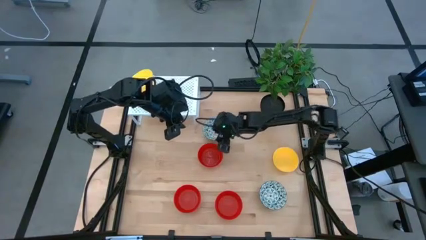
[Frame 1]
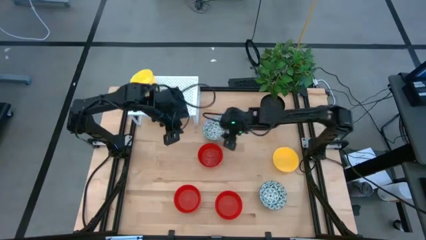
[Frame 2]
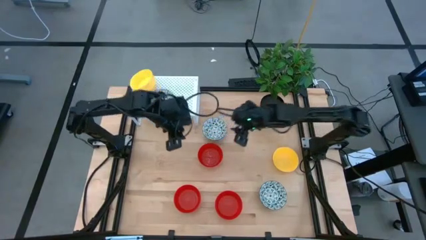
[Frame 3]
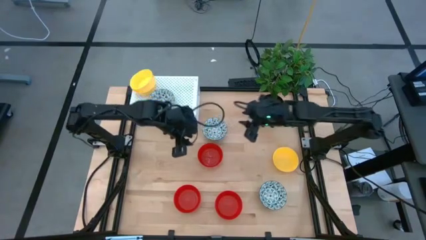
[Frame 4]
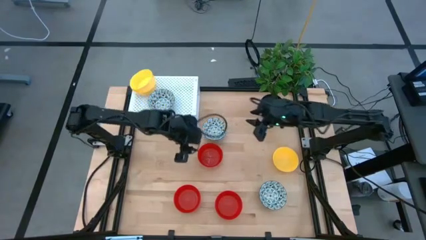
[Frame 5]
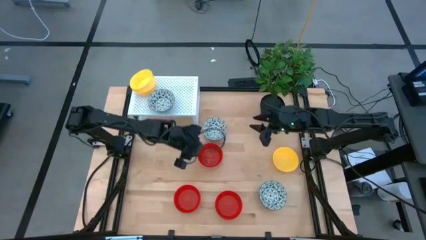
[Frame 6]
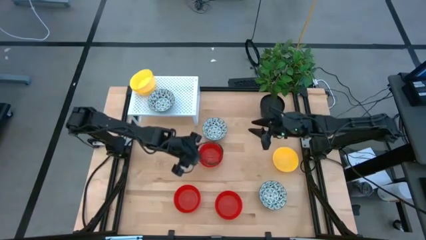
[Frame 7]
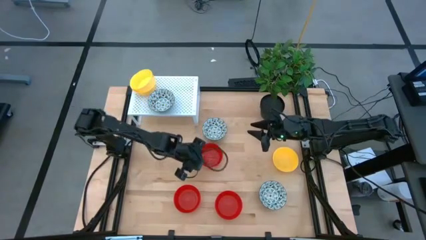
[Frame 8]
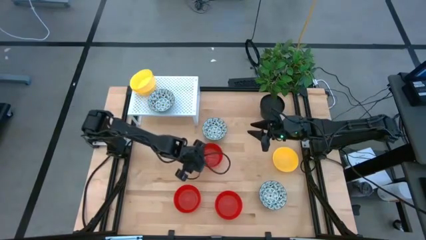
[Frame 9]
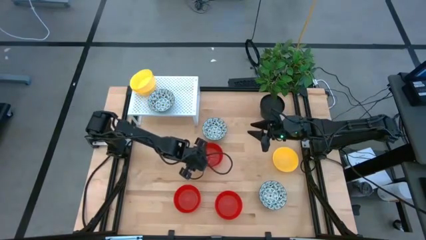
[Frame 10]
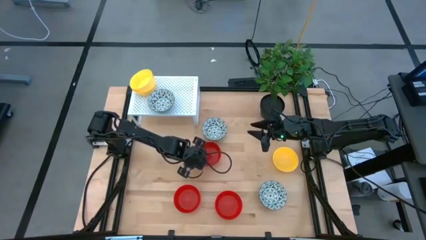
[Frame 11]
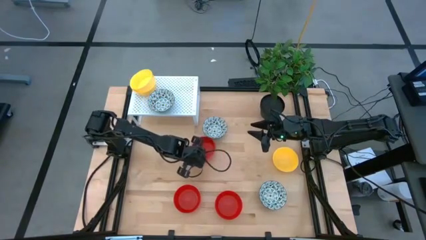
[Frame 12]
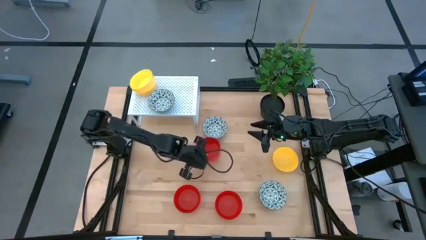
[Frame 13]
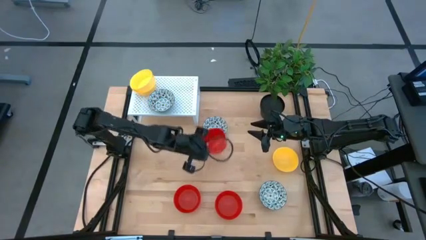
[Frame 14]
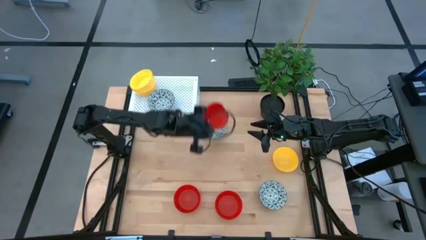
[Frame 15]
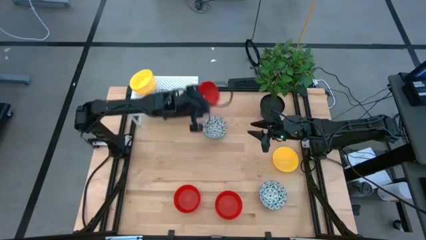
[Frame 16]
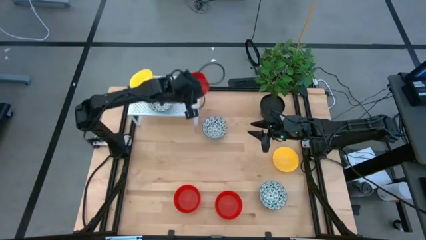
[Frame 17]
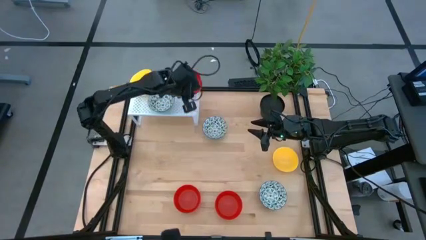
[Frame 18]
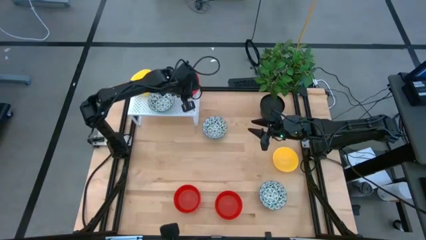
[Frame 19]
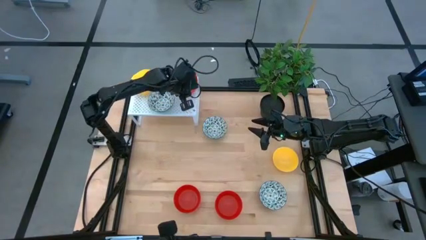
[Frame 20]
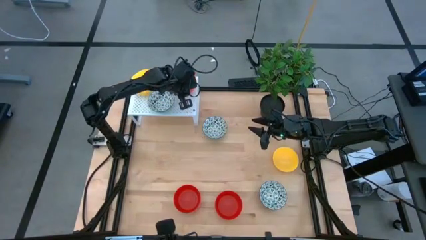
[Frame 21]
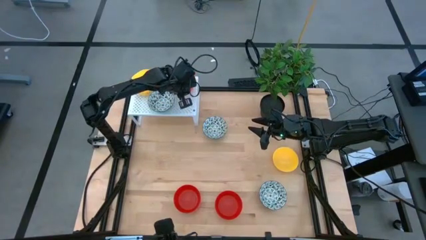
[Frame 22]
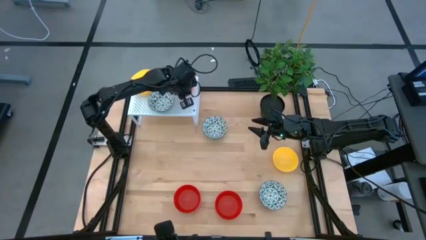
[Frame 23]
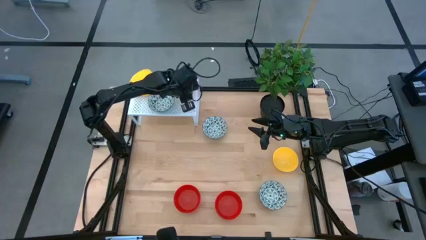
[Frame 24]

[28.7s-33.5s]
Task: Pick & Place Mini bowls
Put the red bowl on the shelf

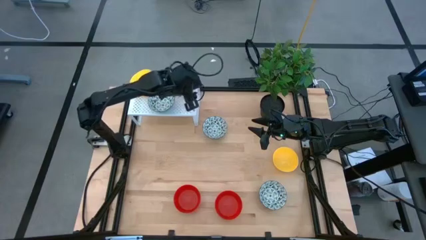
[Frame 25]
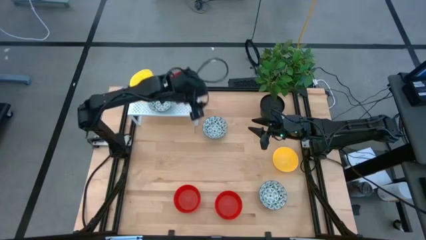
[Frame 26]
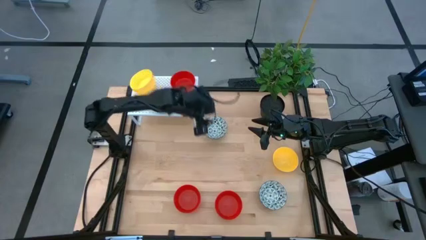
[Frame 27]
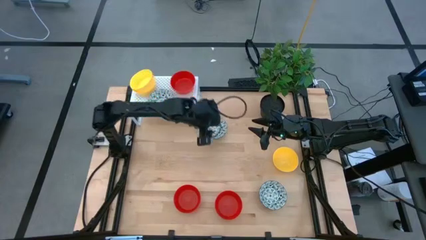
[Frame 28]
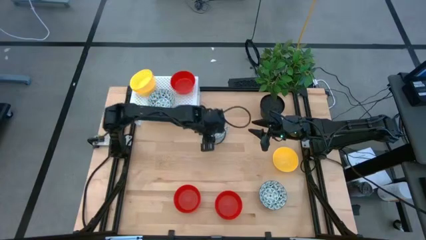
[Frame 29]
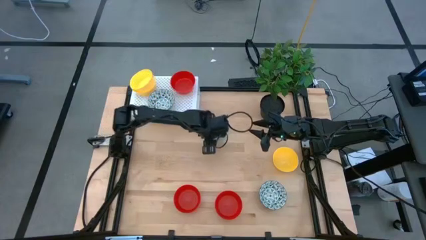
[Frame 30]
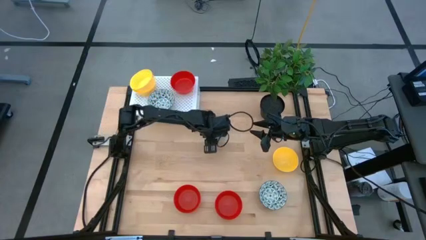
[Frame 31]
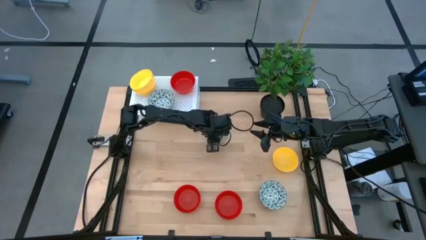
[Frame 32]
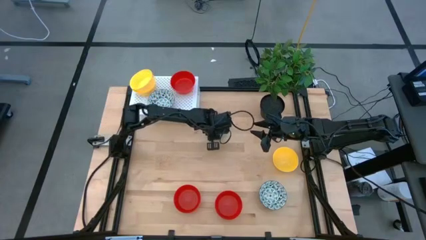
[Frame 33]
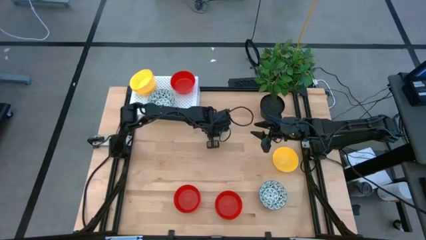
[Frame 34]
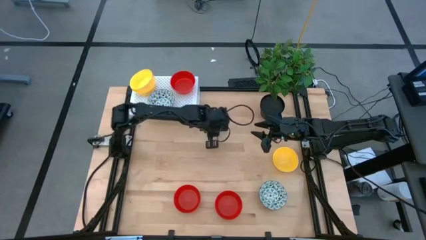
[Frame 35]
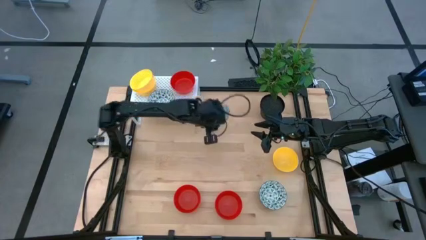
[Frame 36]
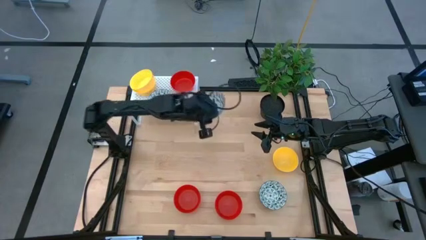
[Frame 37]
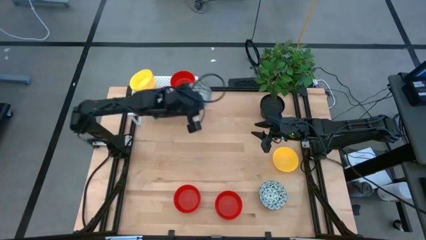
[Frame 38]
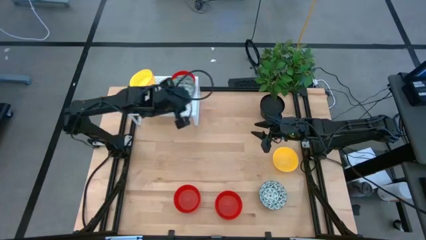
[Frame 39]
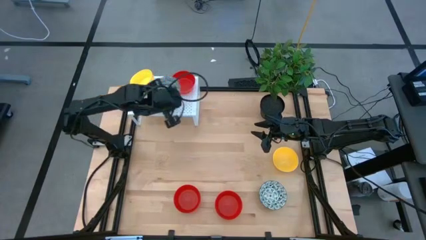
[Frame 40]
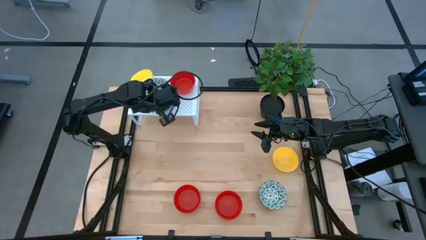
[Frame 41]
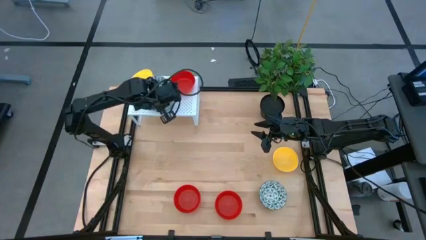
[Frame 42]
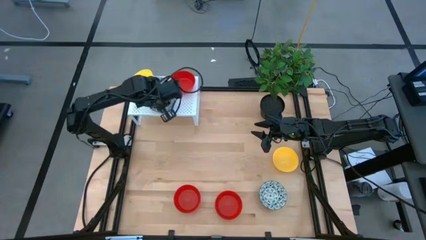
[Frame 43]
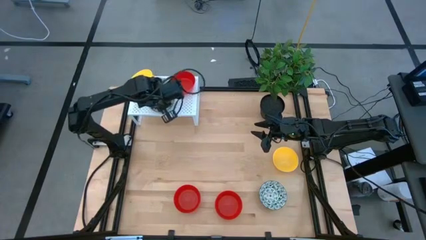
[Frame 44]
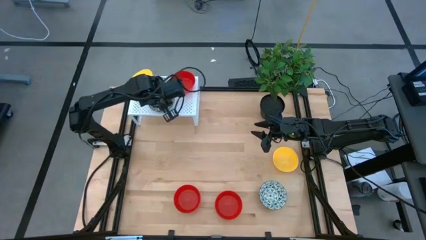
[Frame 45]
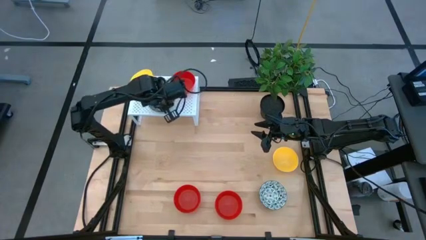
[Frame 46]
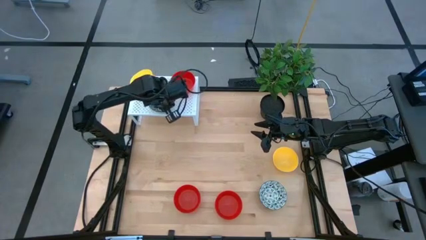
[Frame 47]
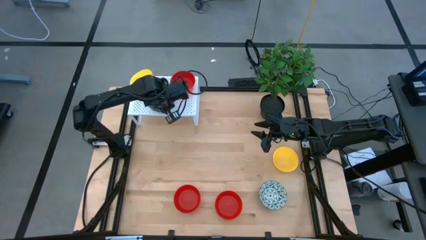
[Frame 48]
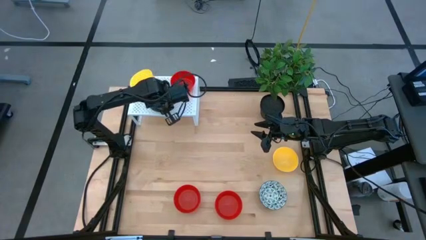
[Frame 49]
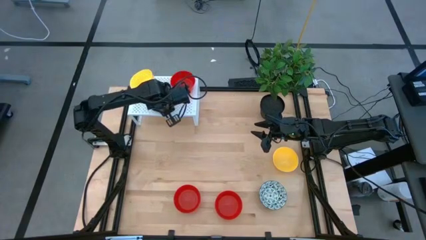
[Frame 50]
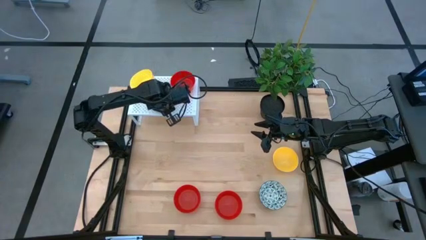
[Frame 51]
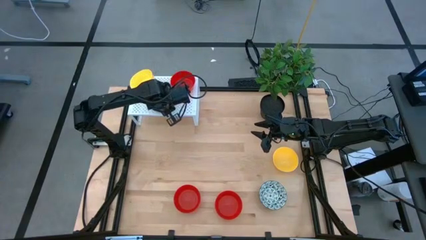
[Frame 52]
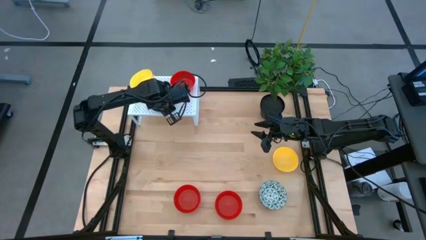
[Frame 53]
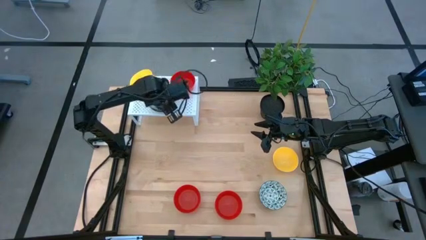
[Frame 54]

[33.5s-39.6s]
Stack the green patterned bowl on top of the green patterned bowls on the shelf

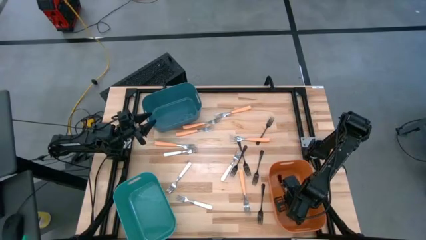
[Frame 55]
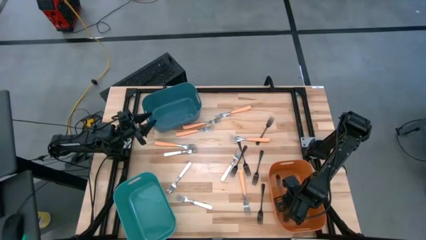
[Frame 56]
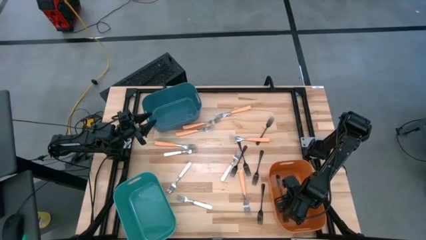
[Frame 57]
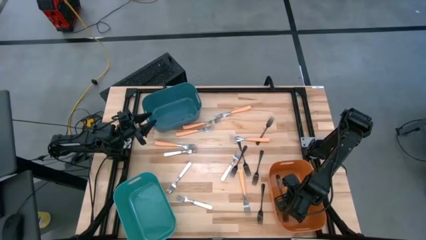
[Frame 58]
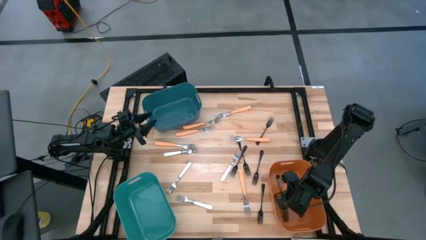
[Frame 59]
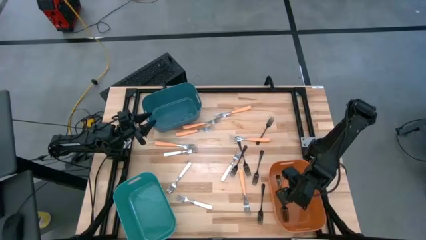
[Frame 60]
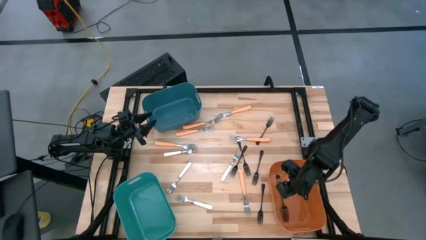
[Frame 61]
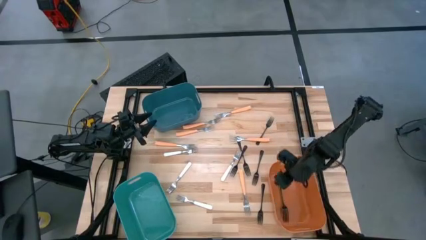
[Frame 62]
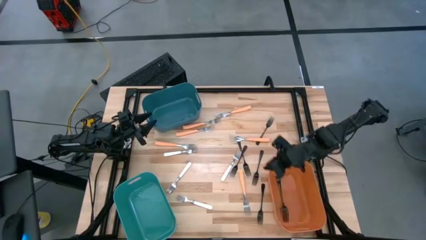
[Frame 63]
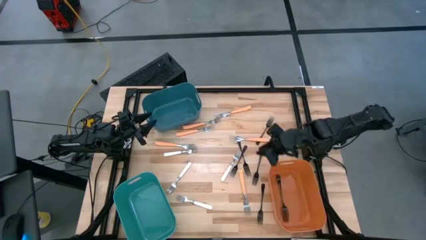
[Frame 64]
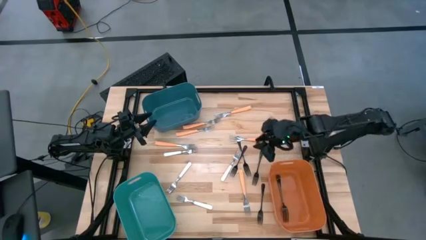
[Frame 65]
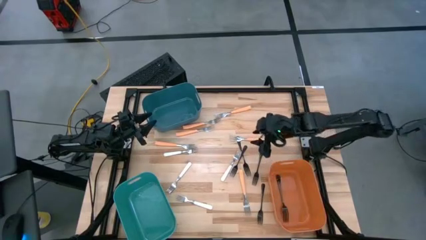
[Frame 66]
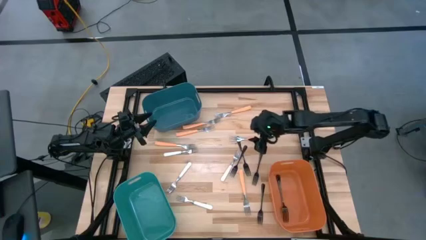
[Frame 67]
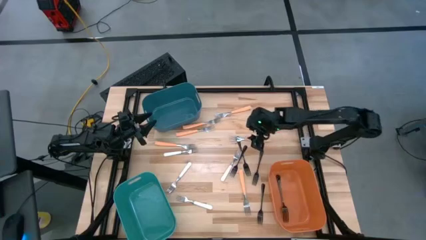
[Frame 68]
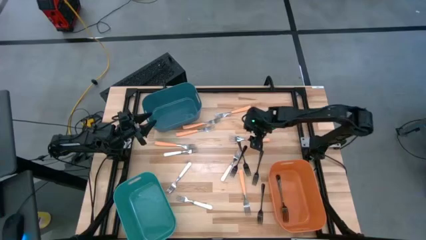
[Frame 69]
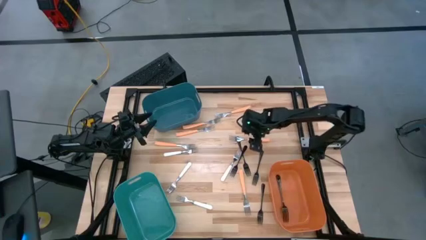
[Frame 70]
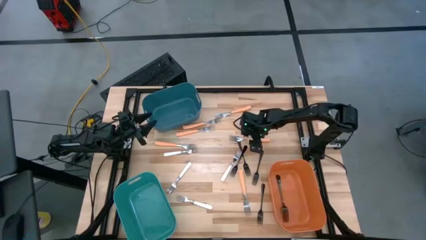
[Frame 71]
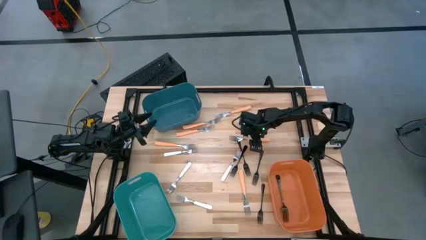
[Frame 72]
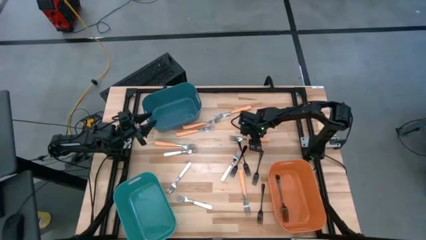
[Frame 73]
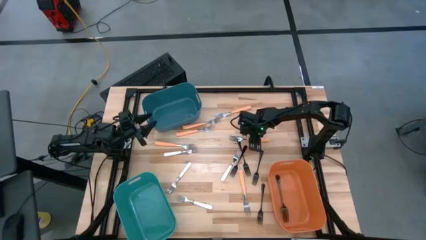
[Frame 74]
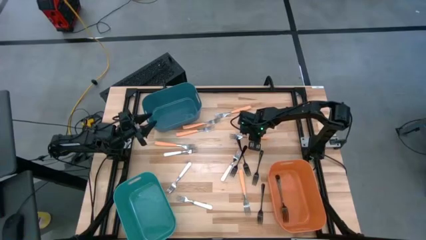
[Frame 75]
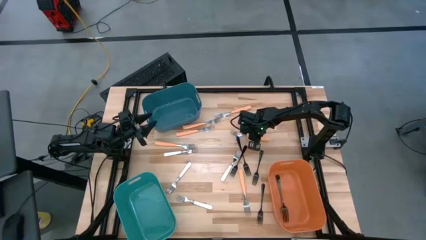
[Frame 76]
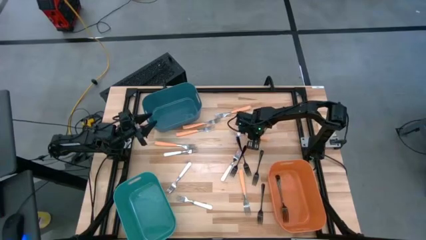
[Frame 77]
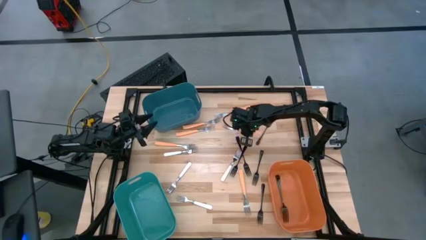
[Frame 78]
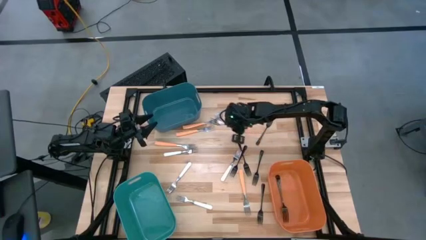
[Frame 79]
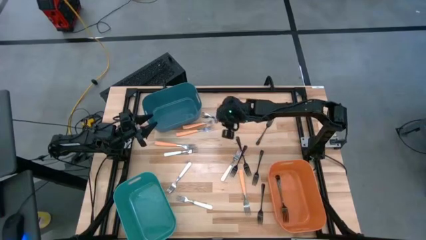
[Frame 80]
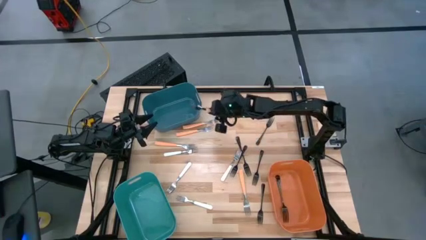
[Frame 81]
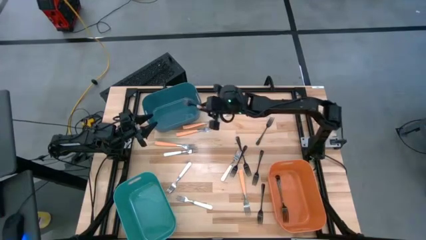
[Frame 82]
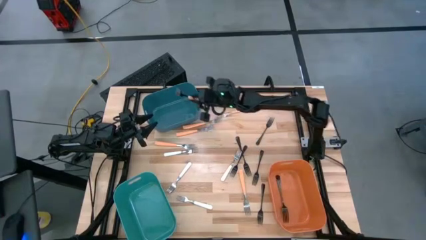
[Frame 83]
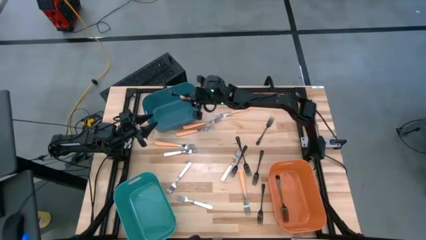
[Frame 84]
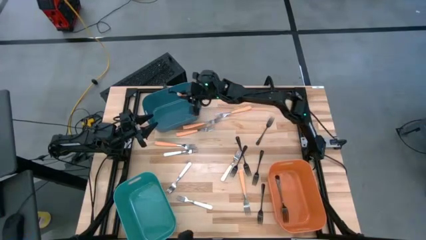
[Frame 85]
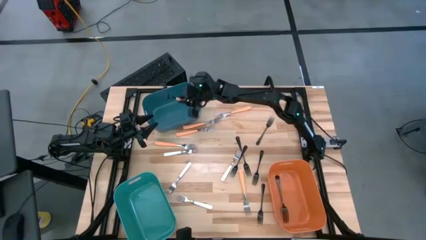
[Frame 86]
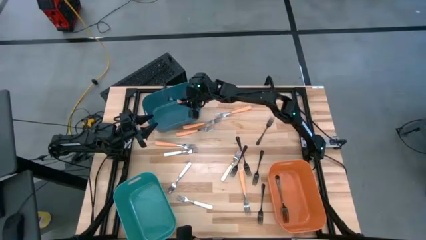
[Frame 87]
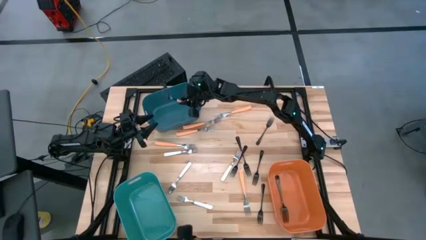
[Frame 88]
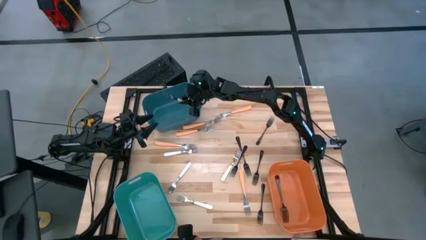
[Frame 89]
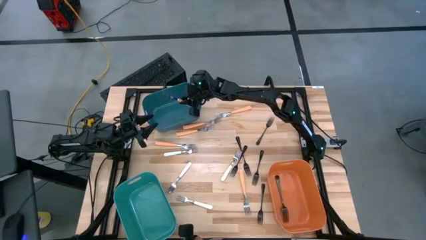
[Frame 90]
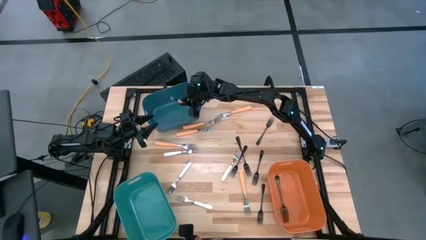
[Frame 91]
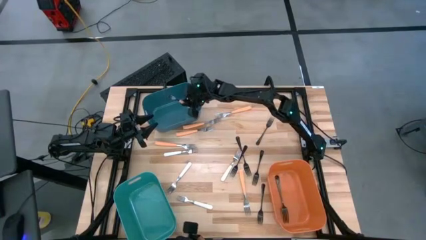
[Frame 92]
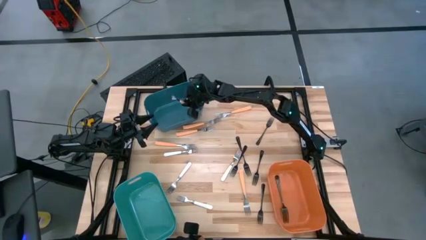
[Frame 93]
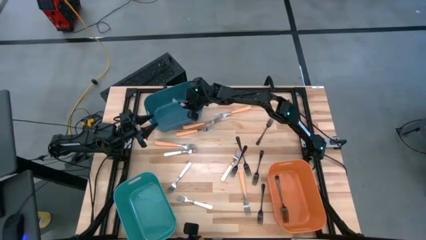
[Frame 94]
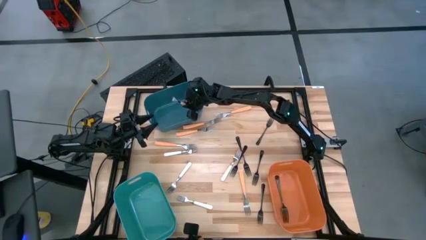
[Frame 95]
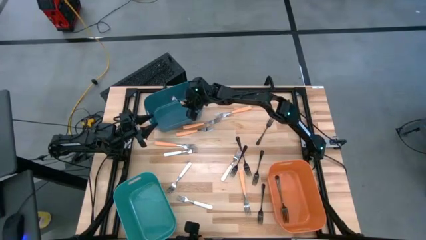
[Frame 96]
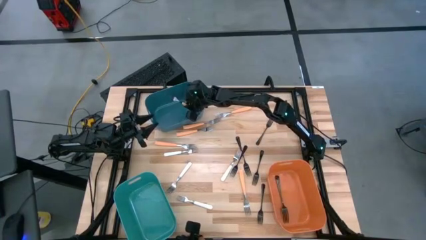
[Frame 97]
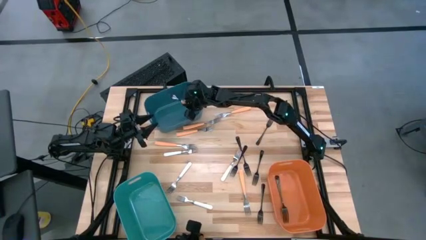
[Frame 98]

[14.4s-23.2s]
Task: Sort silverware by color (type)
Put the orange fork into the blue bin
